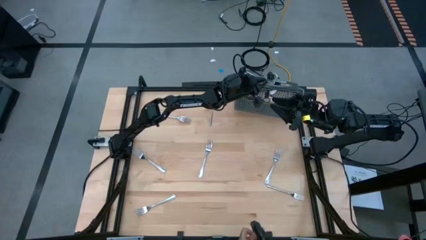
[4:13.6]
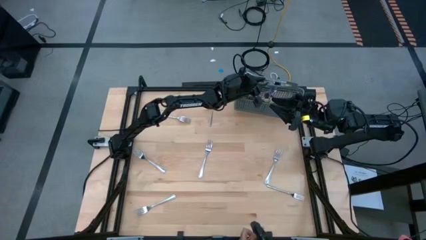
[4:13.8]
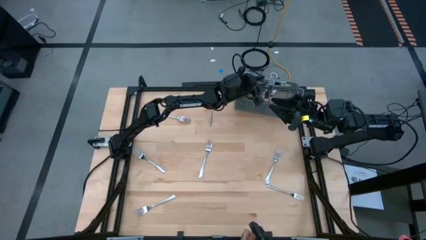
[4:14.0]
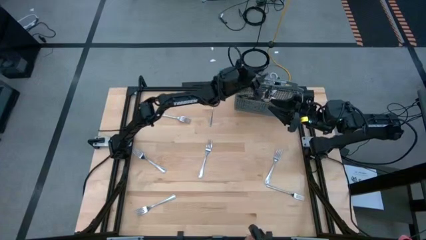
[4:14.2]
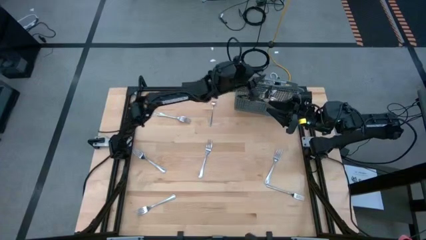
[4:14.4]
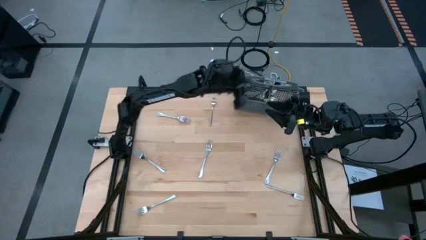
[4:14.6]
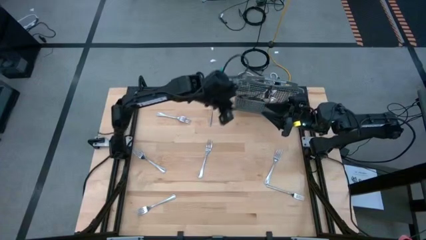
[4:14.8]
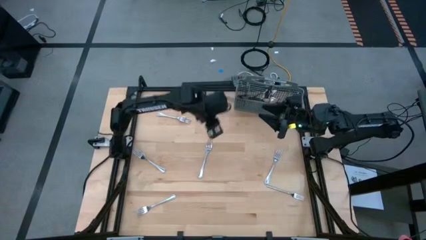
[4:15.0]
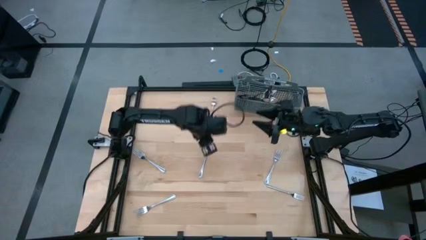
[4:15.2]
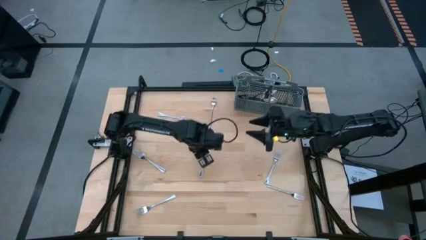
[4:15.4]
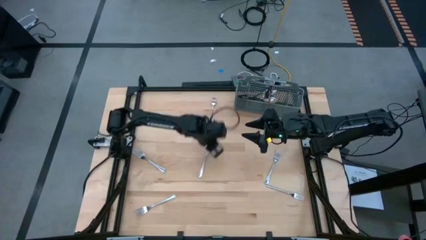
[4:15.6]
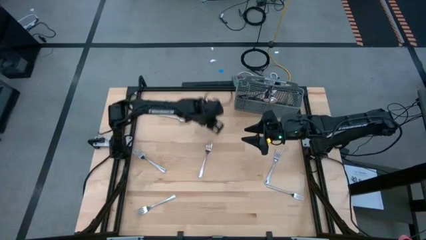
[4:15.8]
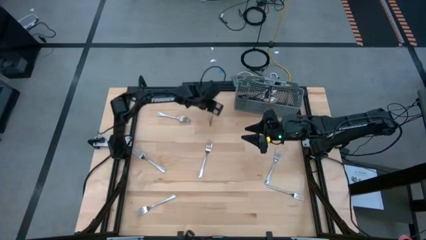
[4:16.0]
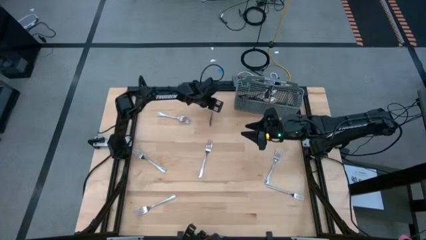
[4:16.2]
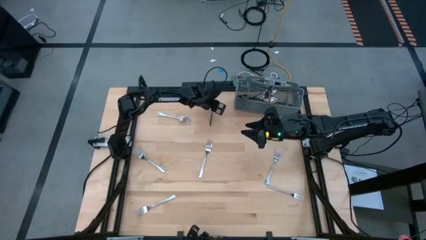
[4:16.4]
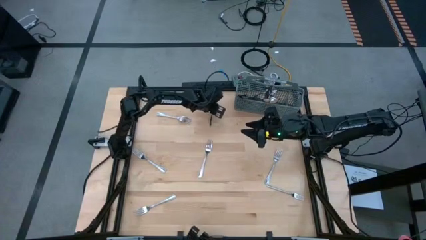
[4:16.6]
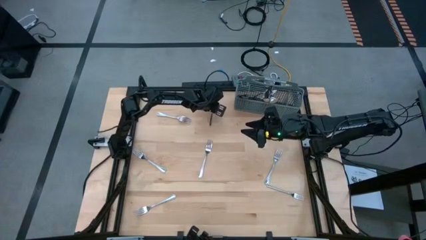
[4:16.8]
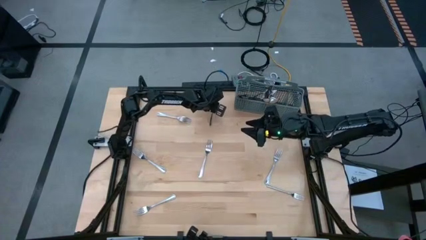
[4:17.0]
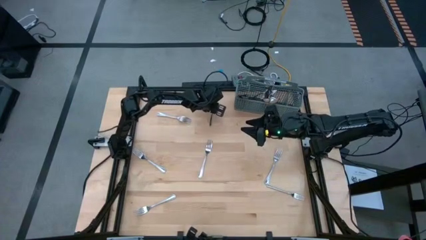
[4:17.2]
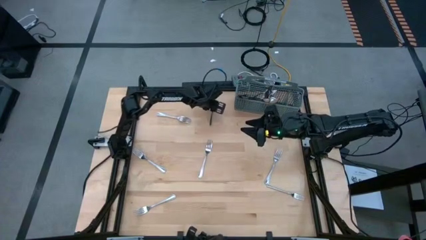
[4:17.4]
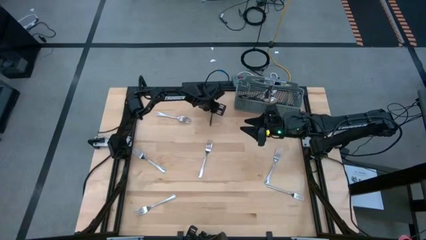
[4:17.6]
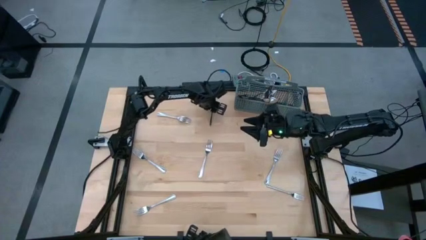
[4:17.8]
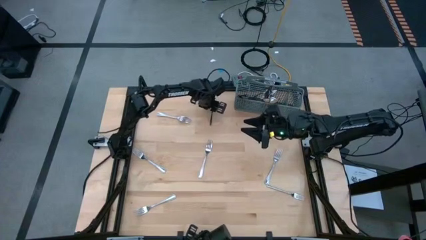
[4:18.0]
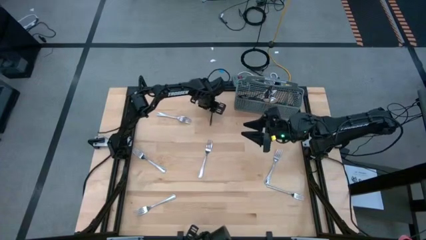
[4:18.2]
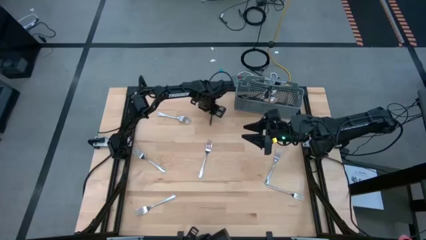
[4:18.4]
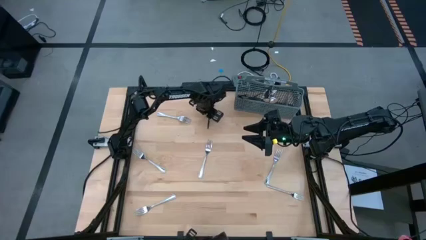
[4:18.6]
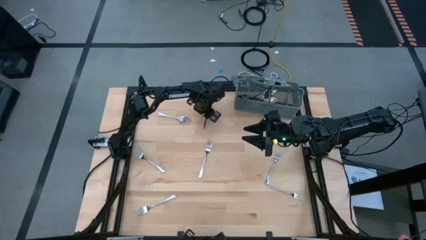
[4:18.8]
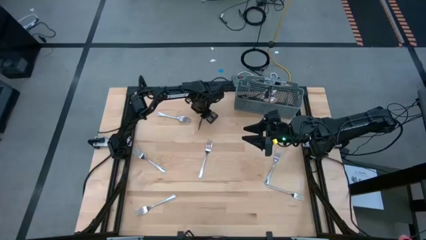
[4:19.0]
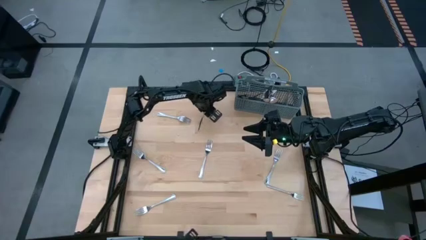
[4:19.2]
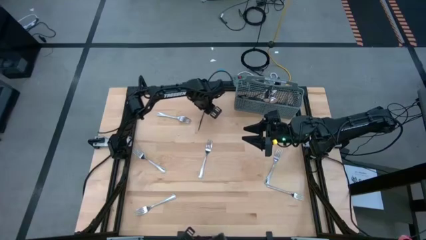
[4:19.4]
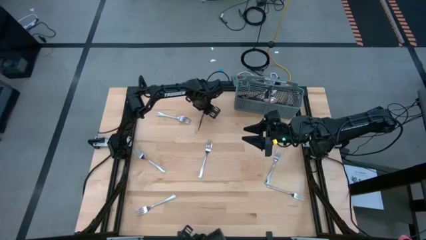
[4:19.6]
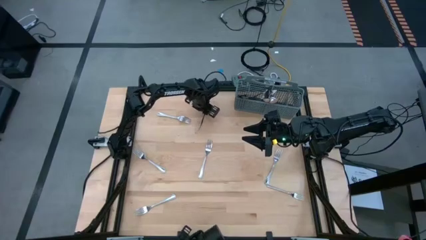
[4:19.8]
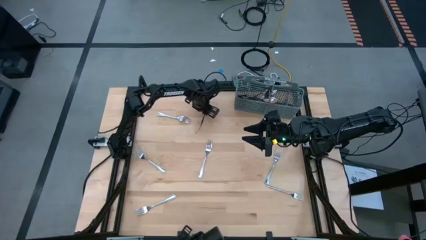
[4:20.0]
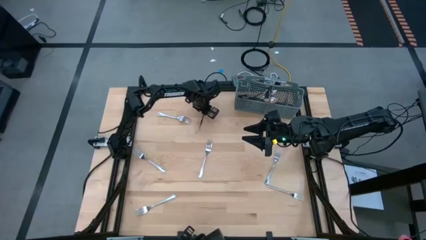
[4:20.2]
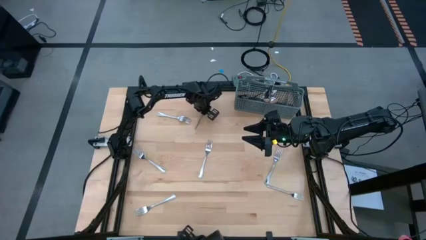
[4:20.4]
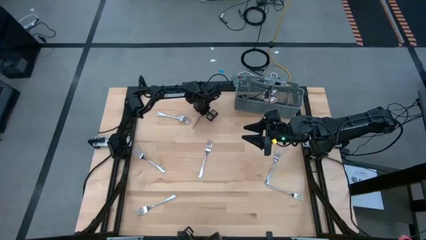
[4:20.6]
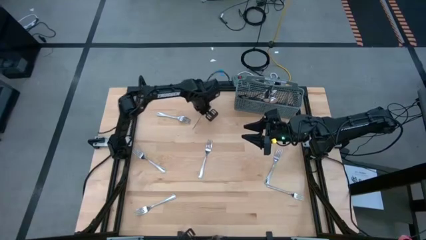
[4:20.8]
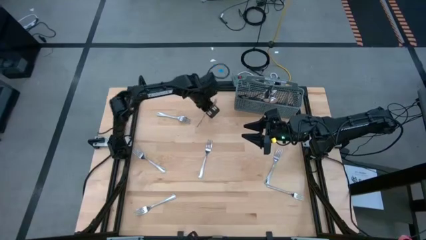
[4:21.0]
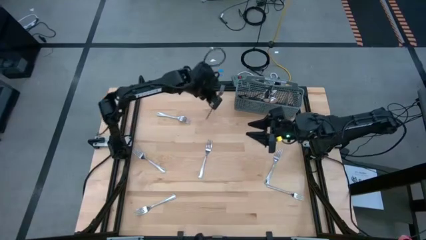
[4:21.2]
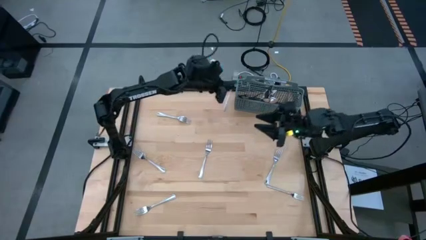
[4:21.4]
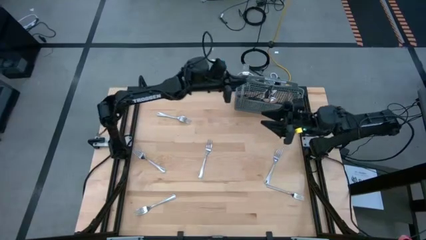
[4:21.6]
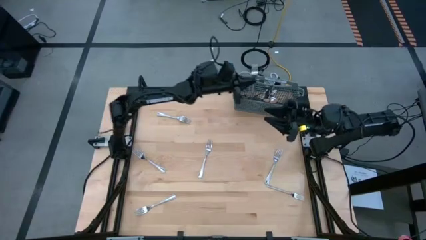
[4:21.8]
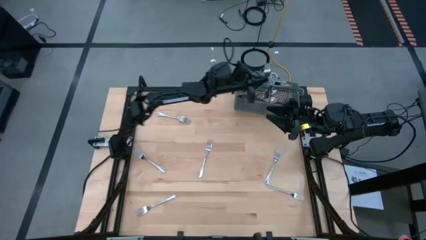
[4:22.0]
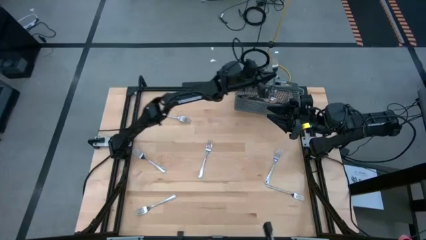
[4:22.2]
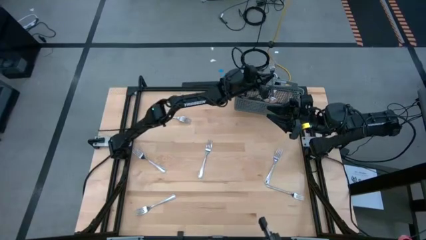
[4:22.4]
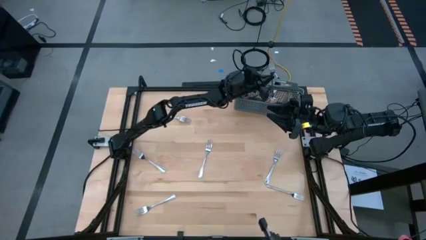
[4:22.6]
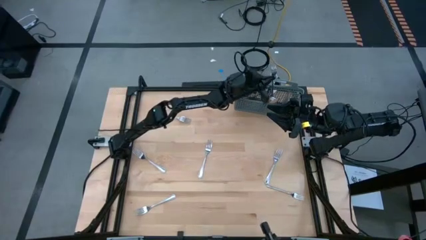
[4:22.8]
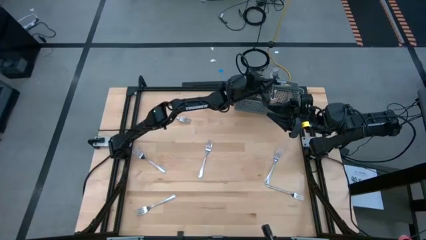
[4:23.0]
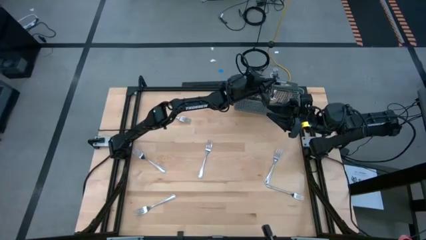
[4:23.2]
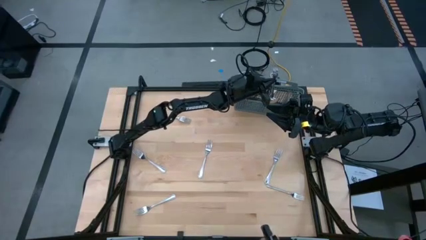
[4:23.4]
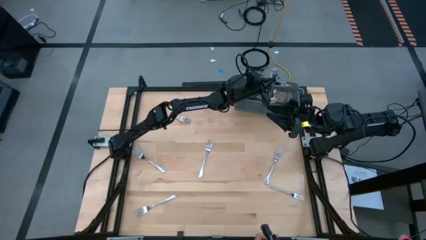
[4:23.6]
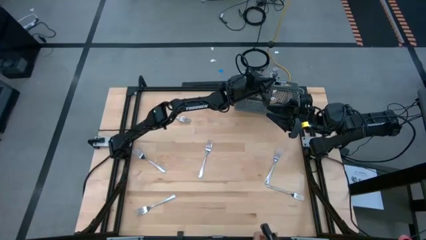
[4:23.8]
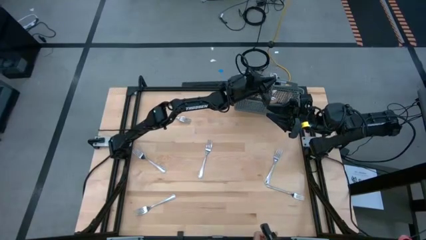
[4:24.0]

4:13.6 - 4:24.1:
Task: Sort silverware
Put the silver fork into the silverware basket

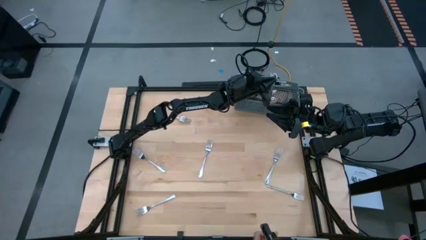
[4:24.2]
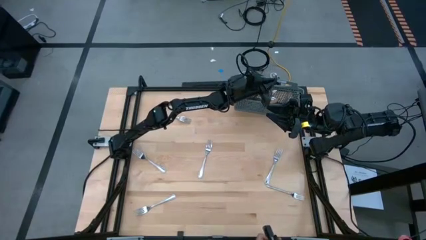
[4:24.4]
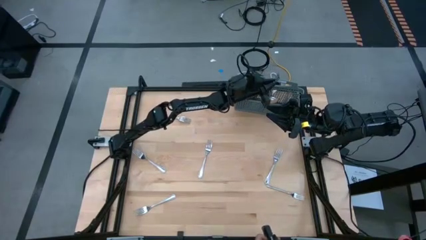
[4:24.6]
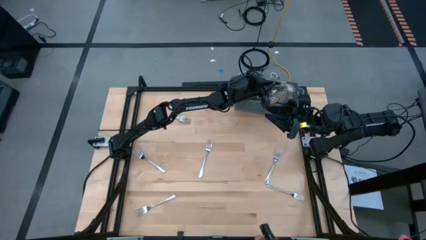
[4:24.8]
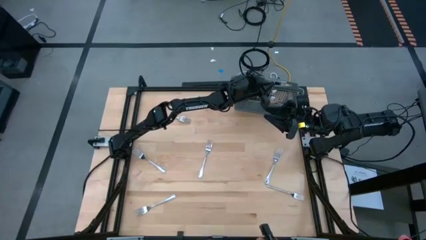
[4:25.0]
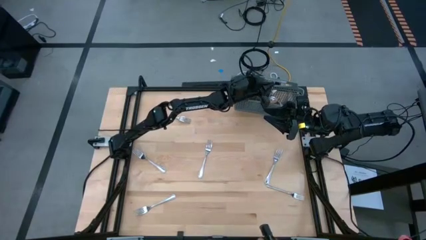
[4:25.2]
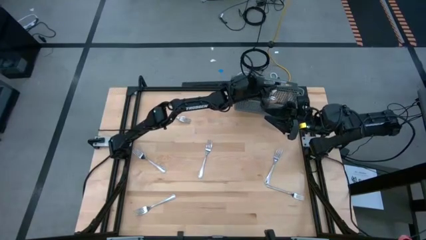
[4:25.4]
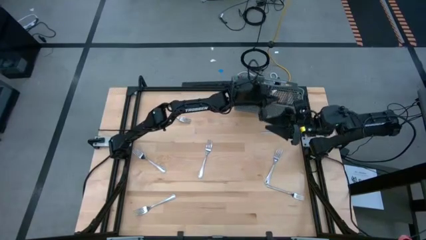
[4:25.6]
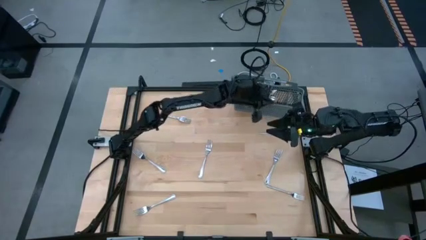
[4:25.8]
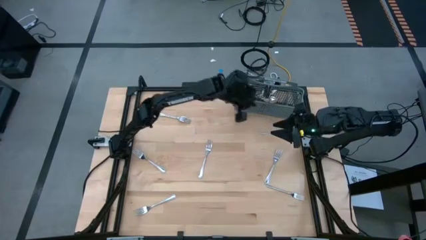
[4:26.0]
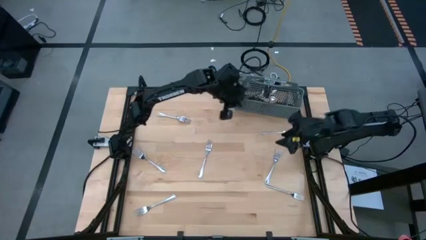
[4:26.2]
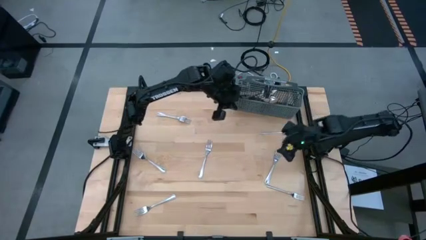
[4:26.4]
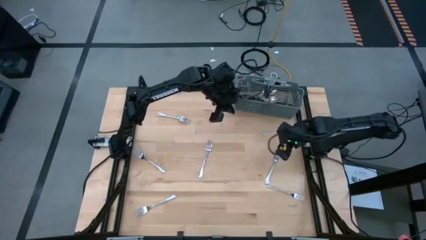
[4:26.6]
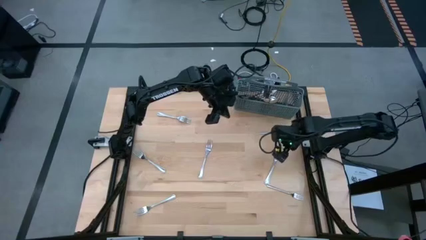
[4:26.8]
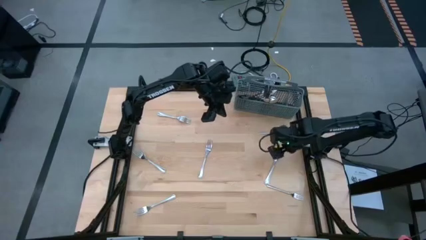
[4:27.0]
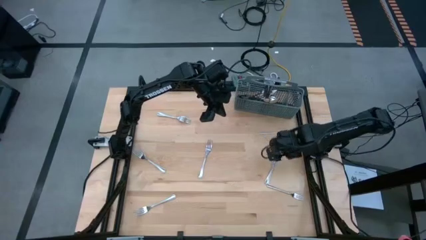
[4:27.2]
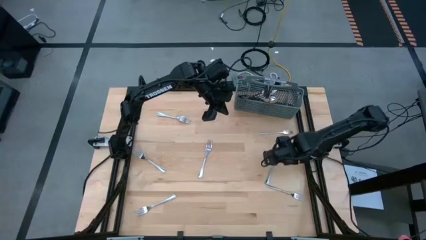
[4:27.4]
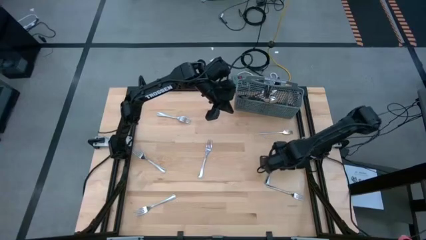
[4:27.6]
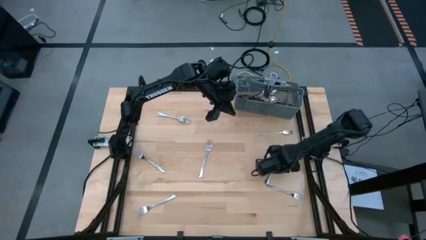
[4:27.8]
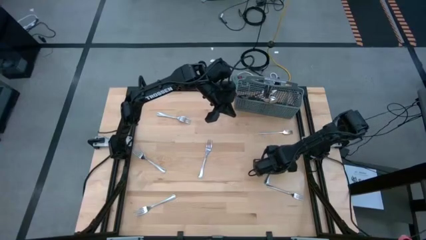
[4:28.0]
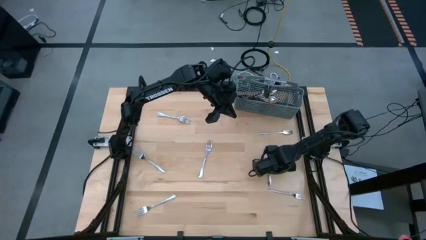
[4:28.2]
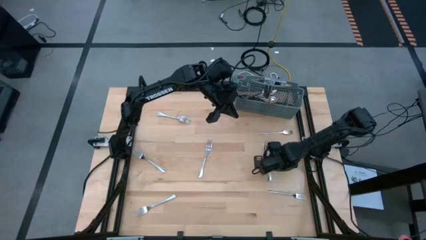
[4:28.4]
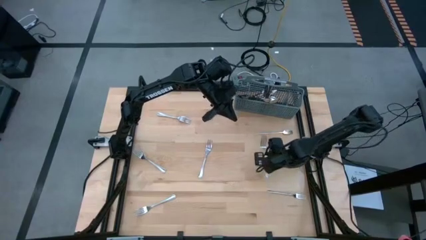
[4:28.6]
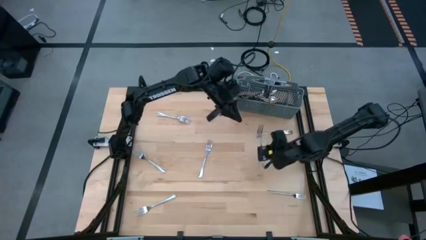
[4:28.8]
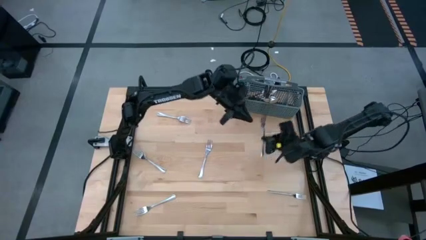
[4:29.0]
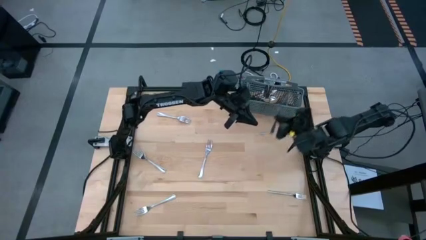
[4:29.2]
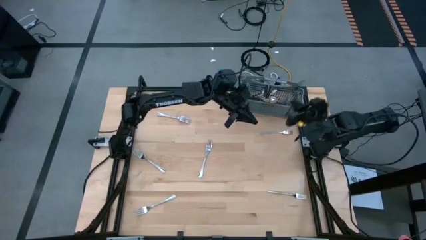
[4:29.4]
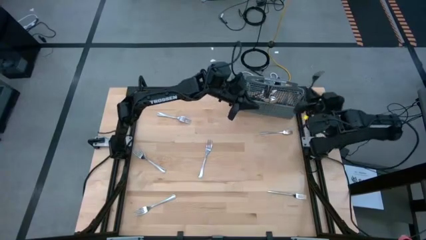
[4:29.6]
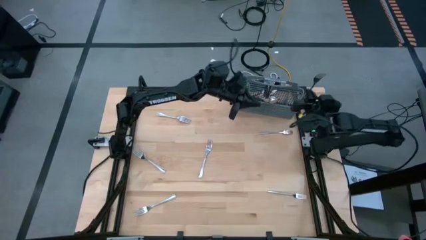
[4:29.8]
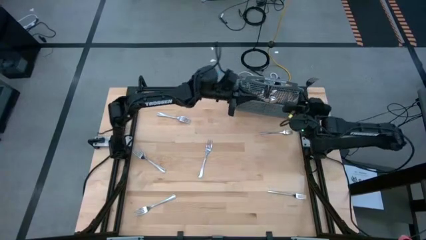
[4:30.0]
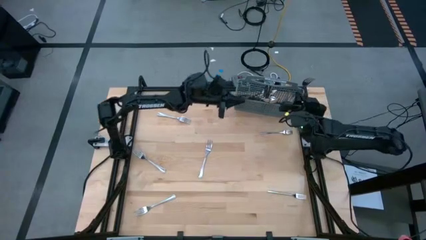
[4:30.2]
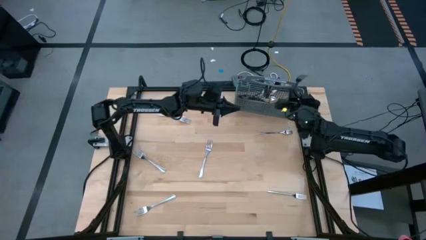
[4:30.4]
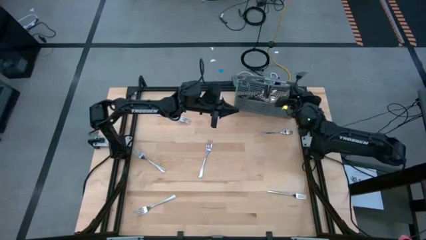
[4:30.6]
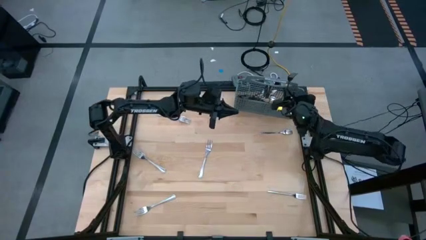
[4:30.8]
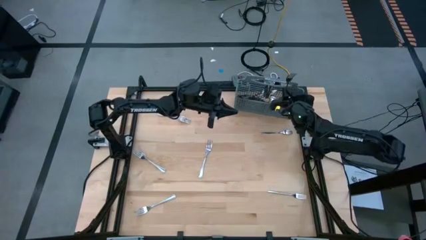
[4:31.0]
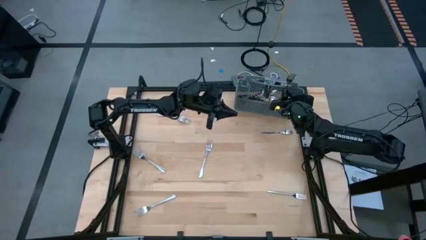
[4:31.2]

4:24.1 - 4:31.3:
Put the silver spoon into the silverware basket
